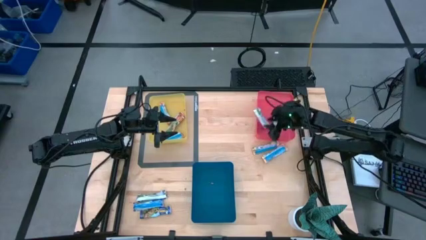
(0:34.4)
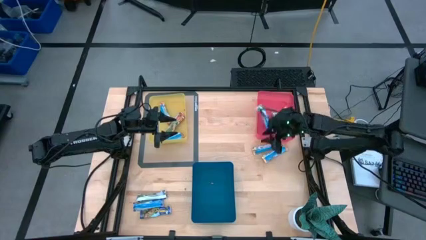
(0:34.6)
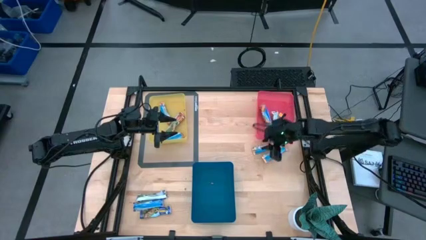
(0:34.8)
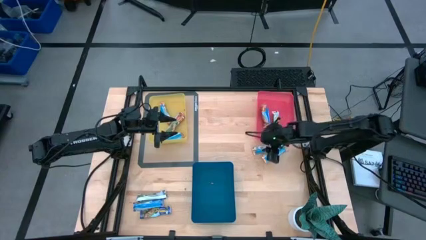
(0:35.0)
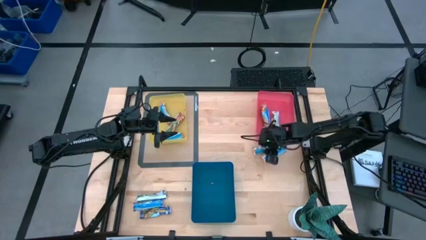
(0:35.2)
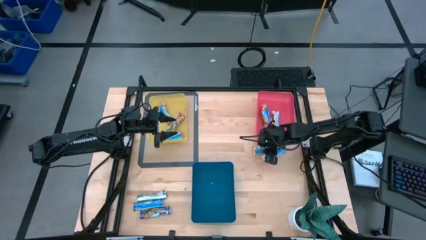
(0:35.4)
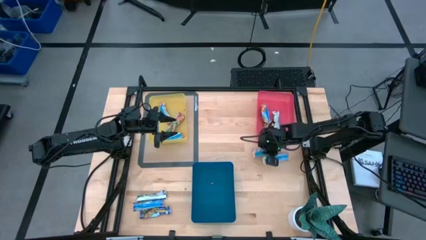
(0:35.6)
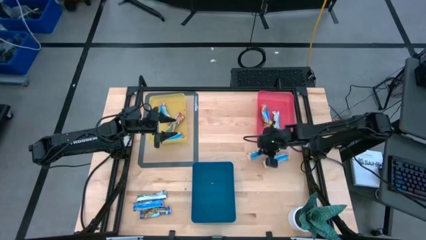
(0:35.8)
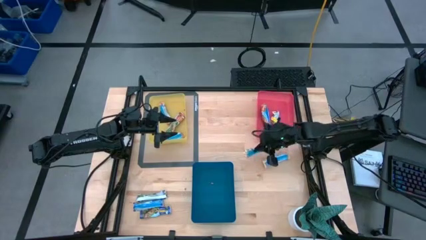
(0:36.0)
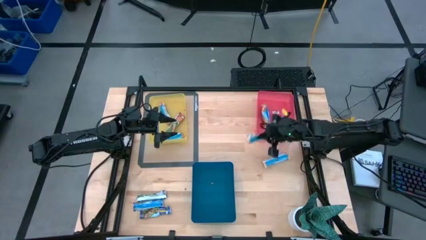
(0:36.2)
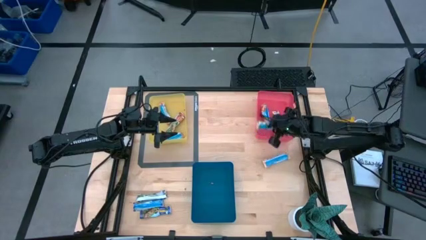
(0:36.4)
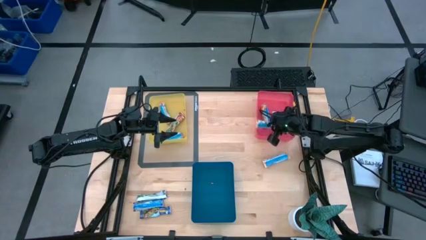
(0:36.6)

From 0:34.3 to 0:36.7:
Task: Pick and place Granola Bars by type
Put the yellow granola bar into the red bin

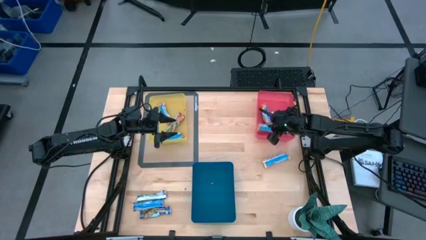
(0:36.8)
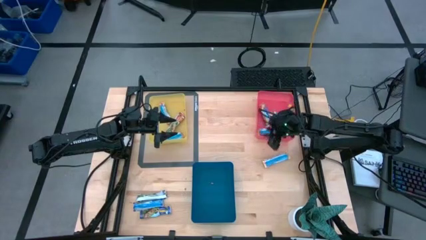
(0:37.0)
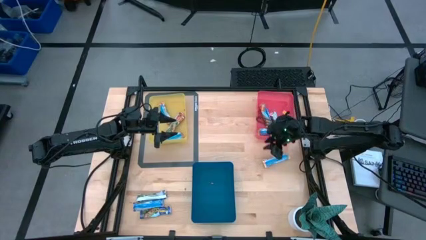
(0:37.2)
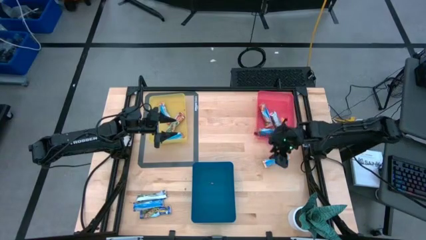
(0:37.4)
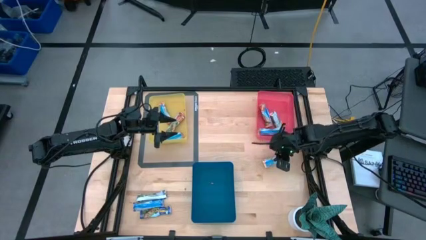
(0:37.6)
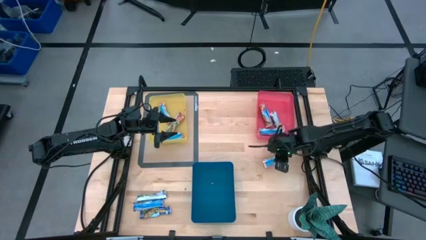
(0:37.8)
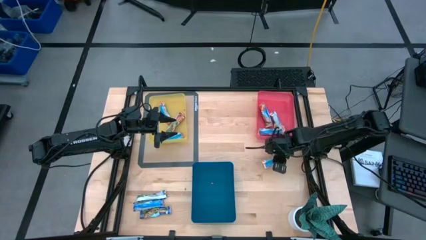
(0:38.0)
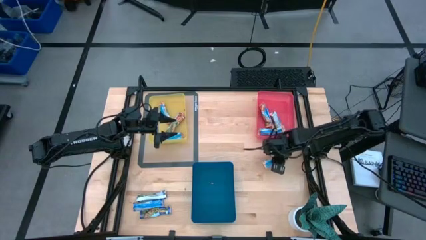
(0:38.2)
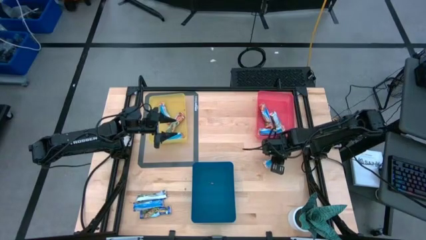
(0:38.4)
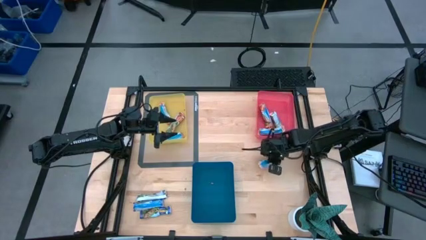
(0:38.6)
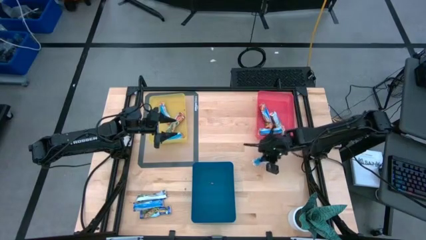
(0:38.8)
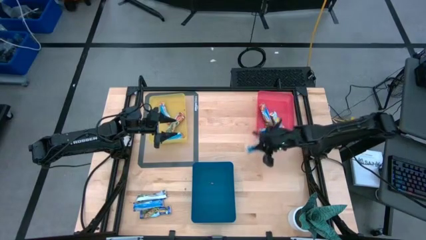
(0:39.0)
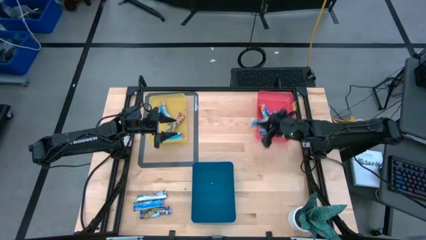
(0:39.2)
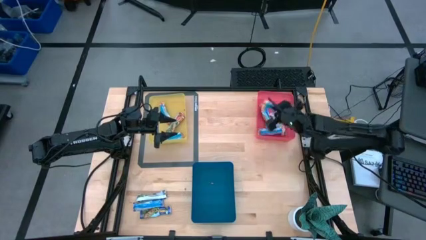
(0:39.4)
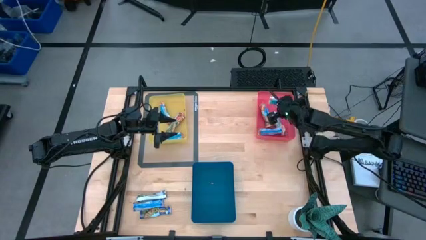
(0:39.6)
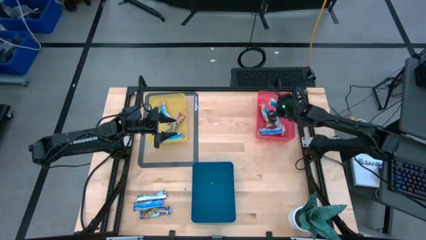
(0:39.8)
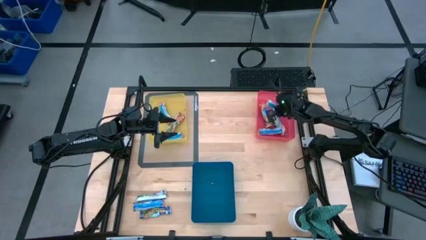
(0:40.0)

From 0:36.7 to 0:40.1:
Put the yellow granola bar into the red bin

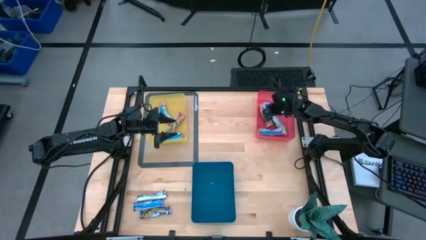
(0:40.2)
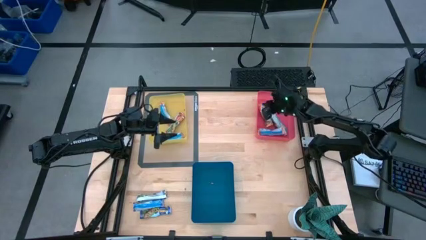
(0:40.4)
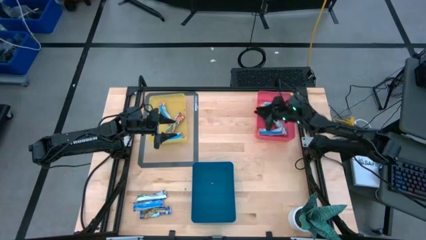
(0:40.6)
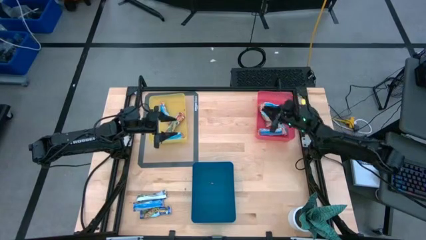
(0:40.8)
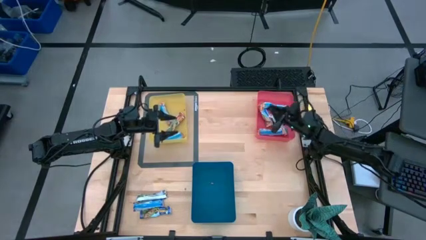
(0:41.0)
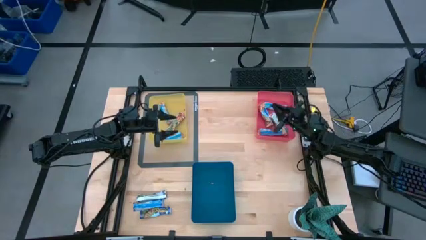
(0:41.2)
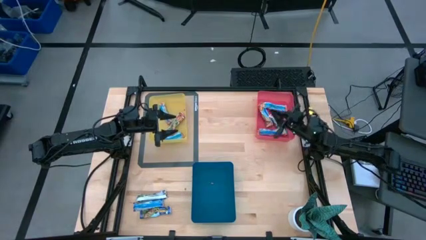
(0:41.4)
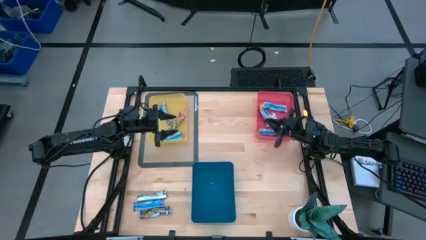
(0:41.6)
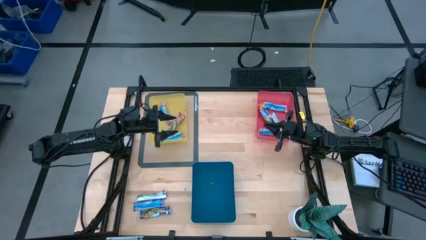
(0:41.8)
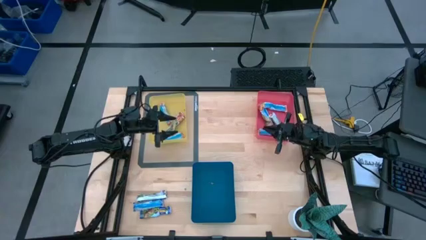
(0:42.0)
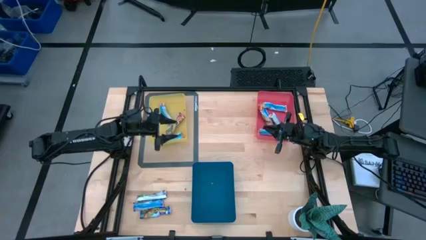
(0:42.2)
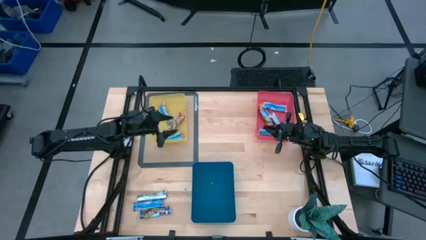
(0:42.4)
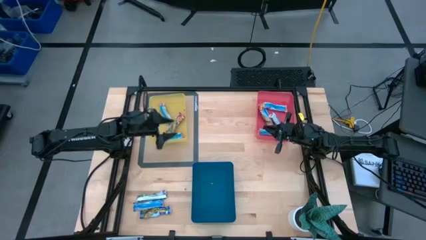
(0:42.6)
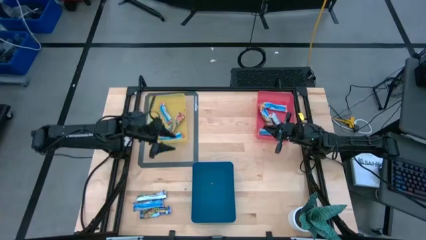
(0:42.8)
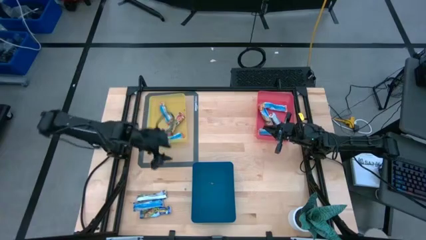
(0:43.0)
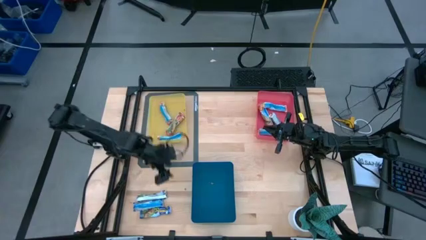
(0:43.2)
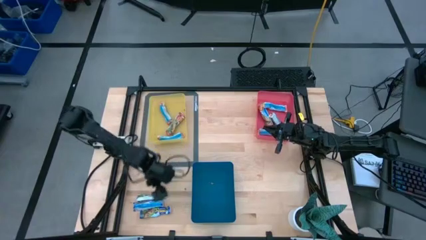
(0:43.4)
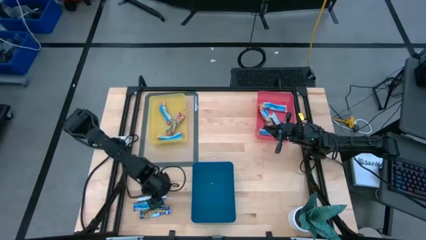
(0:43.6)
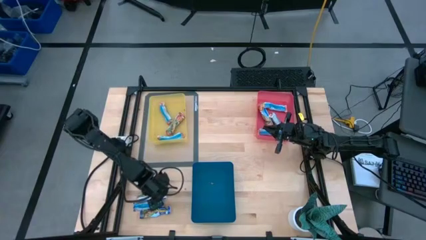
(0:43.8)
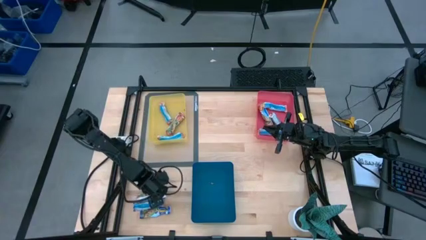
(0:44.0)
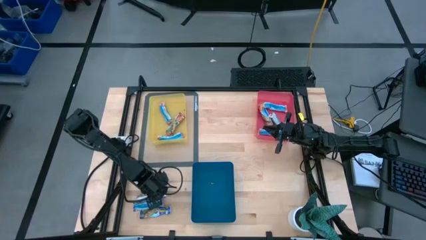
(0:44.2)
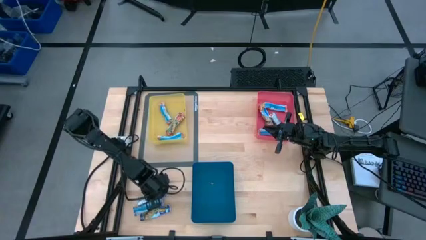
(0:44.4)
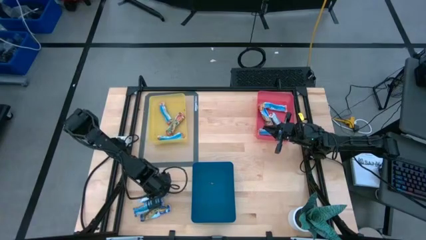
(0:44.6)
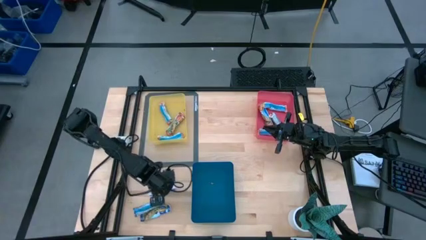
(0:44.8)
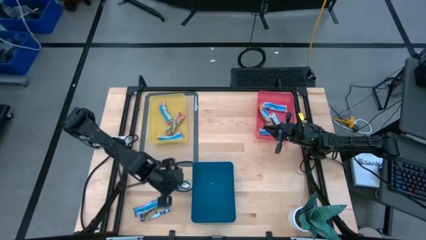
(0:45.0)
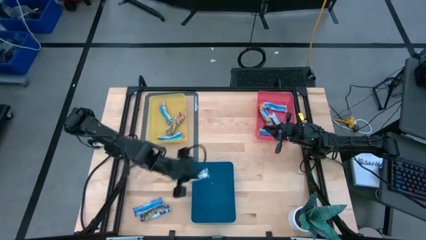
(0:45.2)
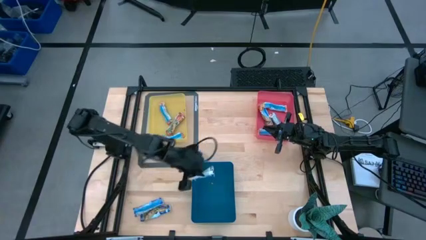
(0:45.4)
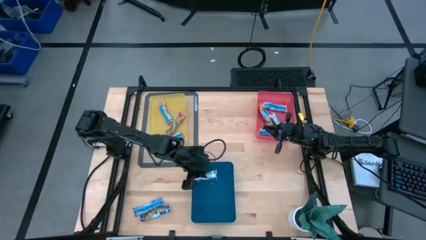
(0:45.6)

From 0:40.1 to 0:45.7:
Put the blue granola bar into the blue bin

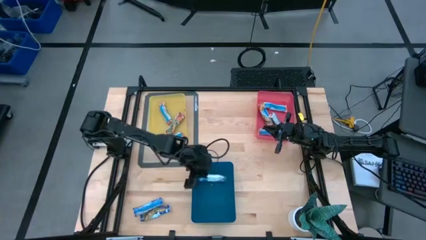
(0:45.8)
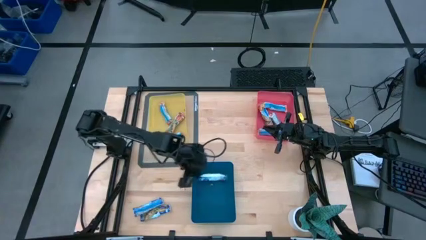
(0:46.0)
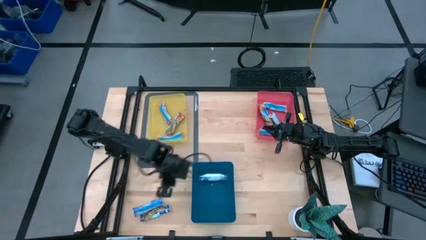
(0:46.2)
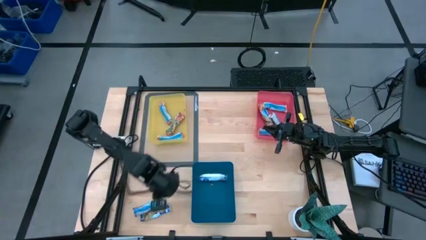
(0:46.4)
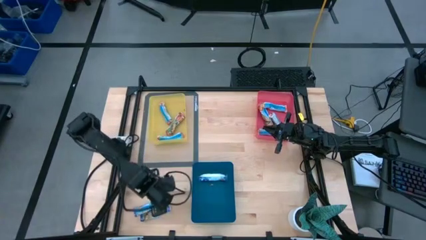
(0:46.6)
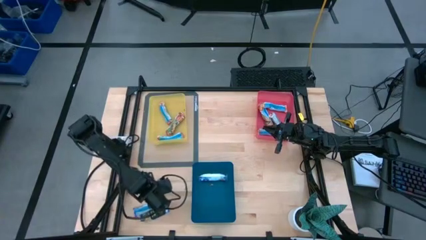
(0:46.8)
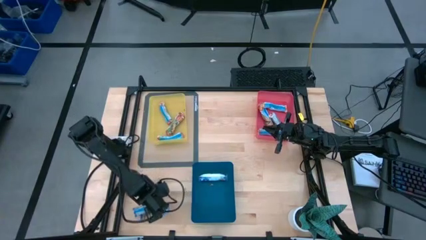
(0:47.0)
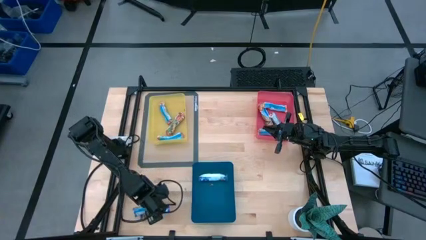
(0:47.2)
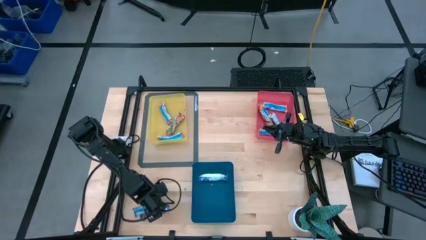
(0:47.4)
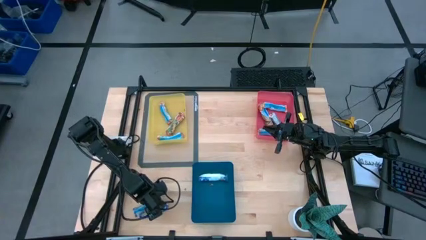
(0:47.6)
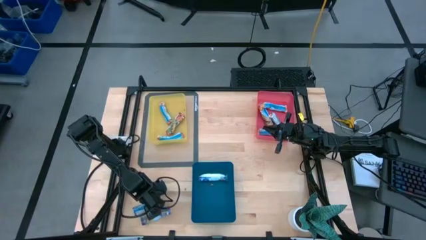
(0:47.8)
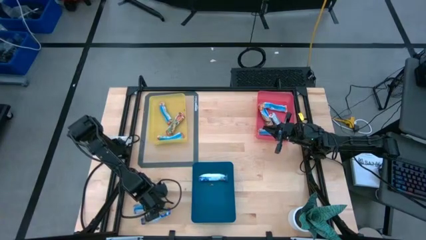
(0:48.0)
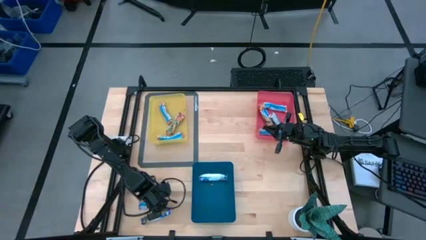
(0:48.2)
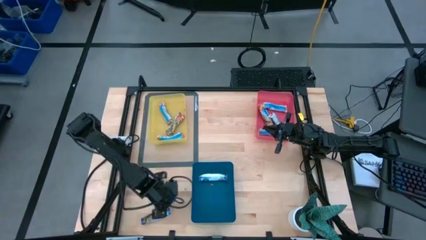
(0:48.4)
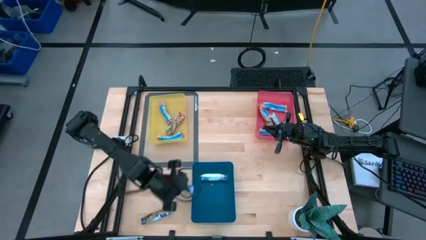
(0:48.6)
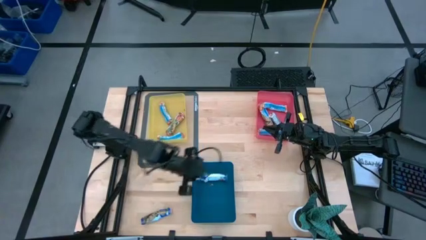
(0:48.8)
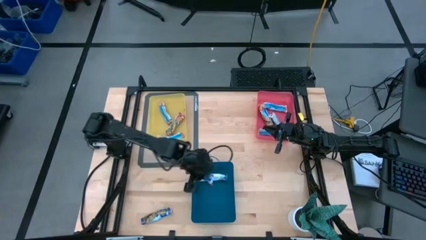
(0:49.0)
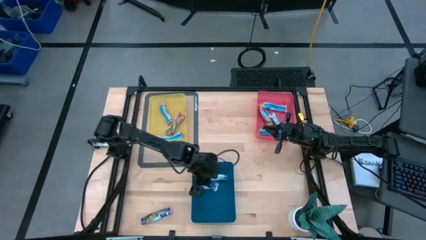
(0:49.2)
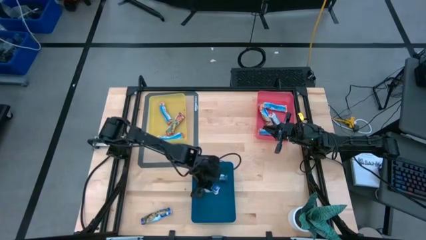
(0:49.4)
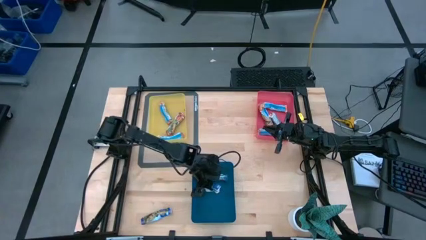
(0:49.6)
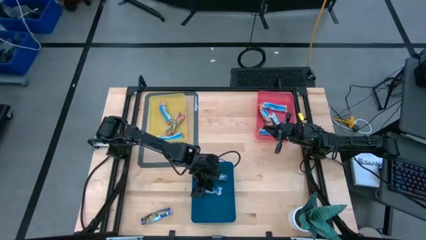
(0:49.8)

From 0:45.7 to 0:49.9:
Put the blue granola bar into the blue bin

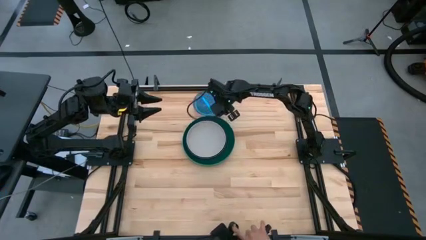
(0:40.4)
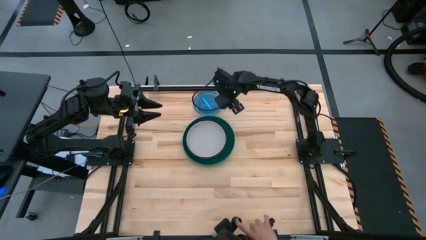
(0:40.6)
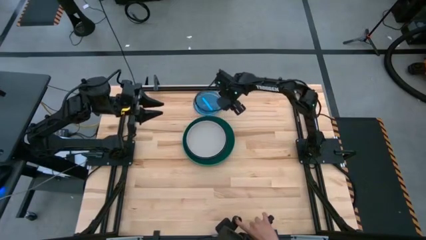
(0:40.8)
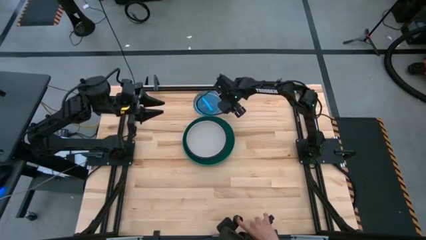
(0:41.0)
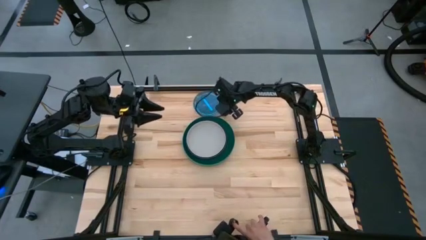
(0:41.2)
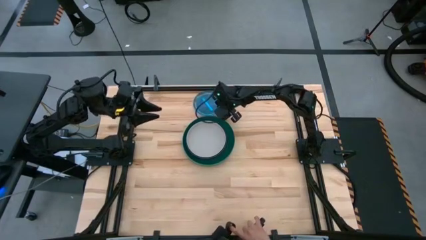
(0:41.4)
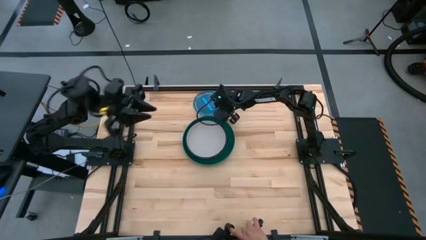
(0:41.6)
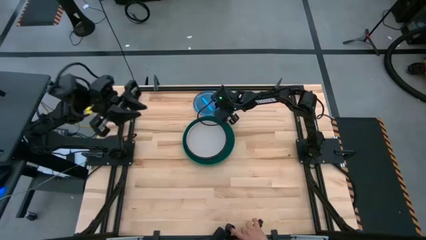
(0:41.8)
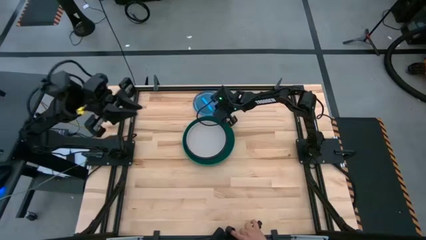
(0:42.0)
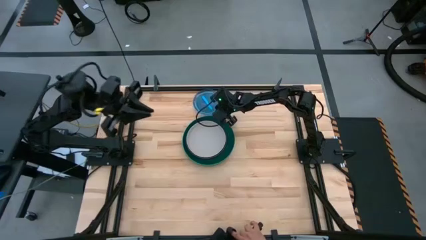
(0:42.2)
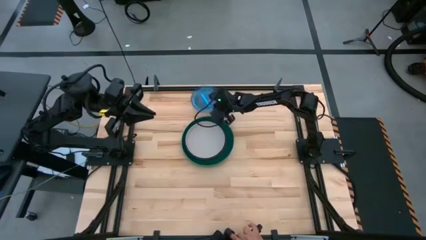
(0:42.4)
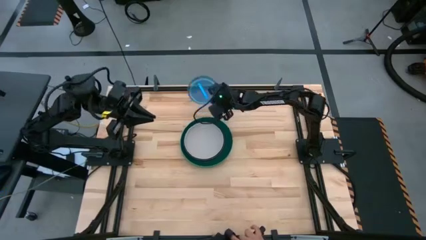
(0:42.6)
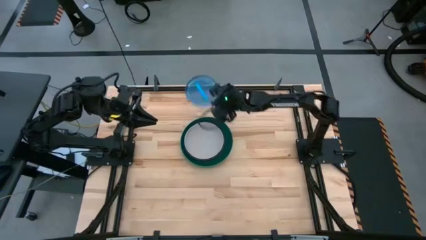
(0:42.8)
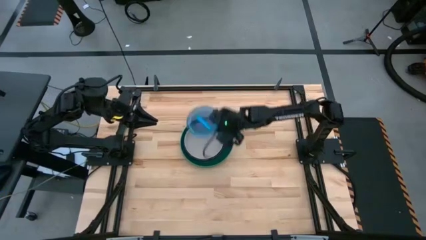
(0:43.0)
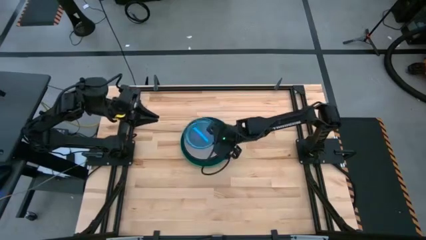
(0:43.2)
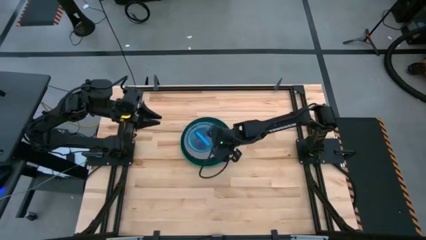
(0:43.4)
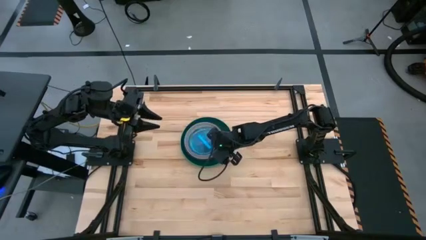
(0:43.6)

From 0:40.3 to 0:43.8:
Task: Stack plastic plates
Stack the stacked transparent plates on the gray plate
